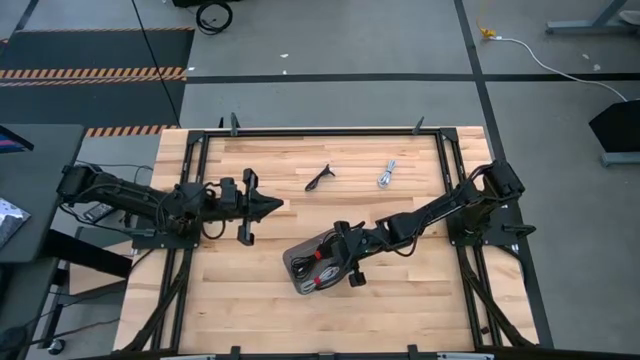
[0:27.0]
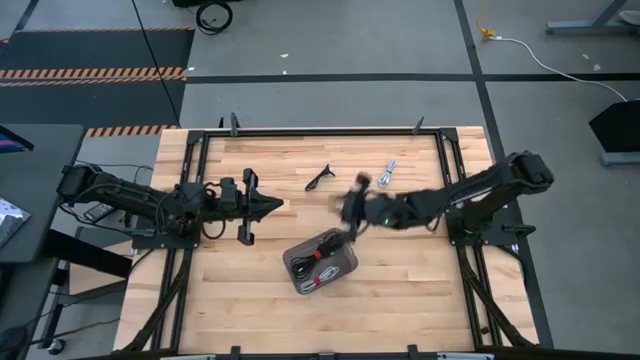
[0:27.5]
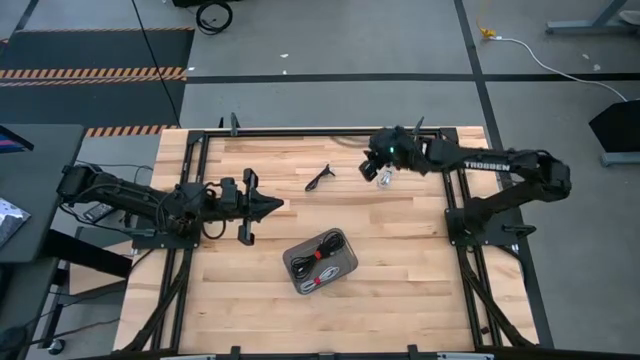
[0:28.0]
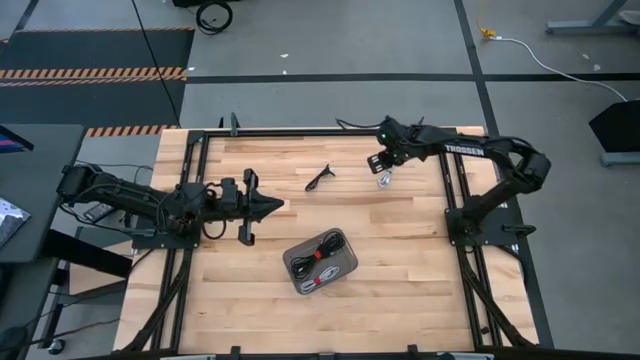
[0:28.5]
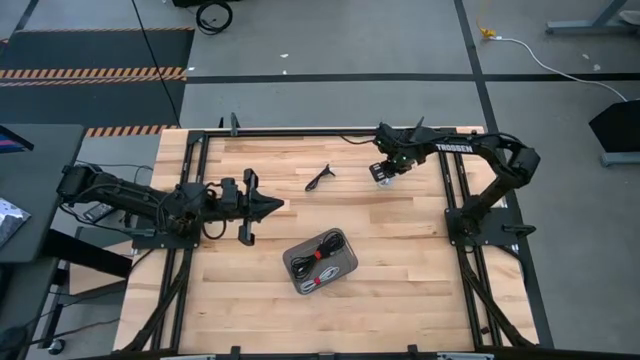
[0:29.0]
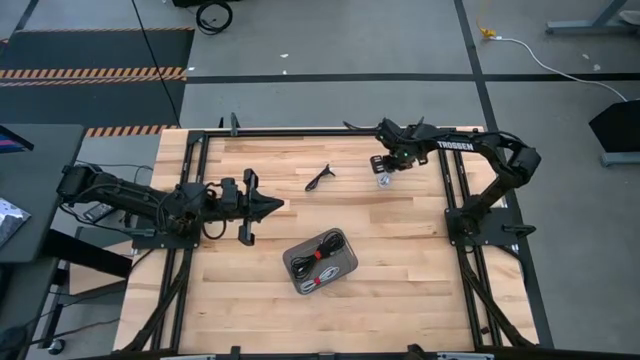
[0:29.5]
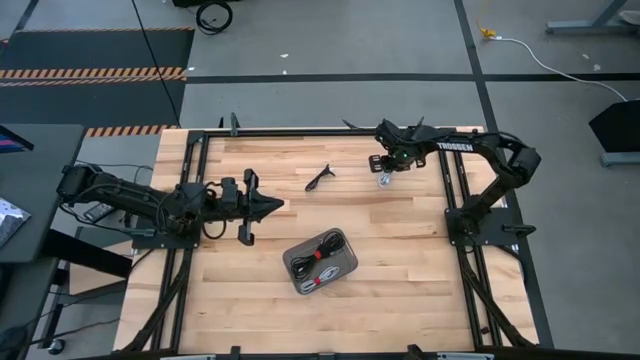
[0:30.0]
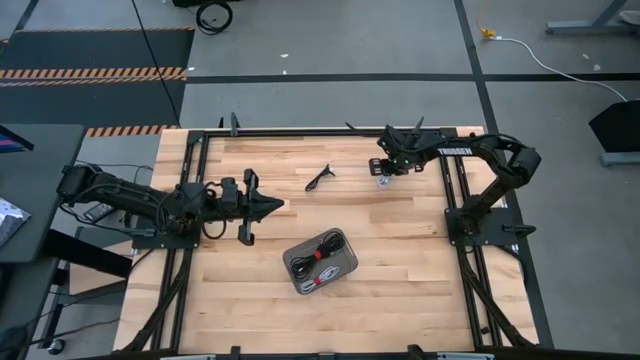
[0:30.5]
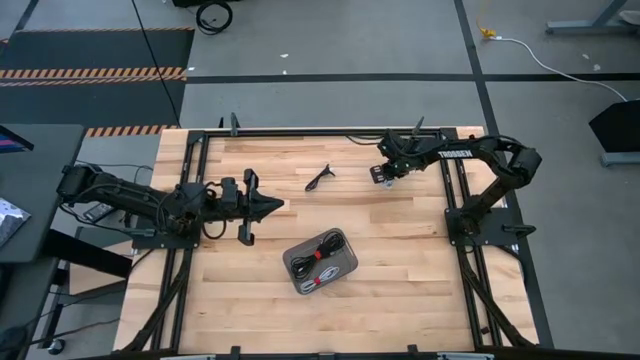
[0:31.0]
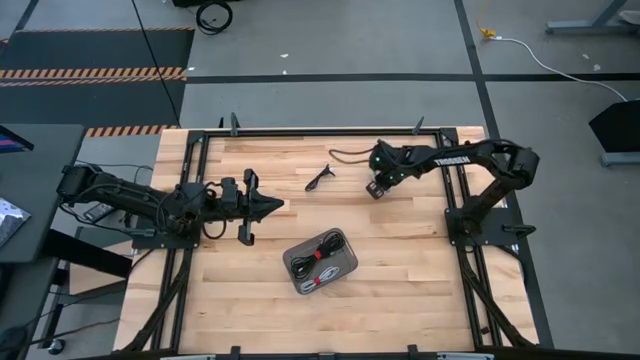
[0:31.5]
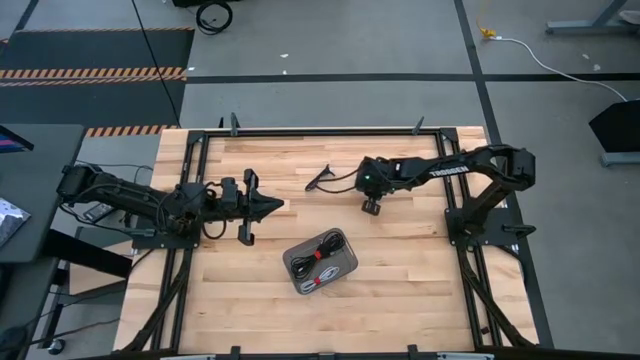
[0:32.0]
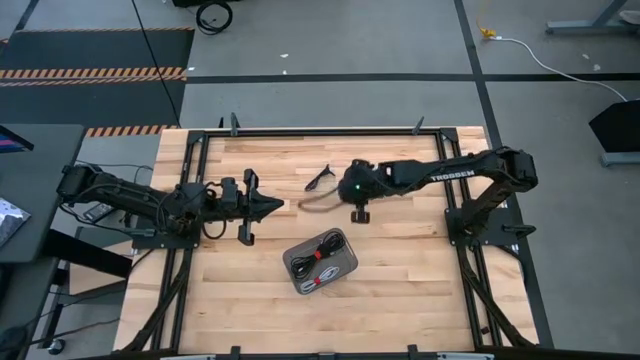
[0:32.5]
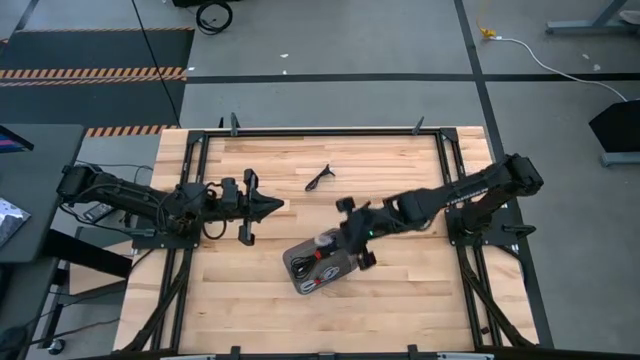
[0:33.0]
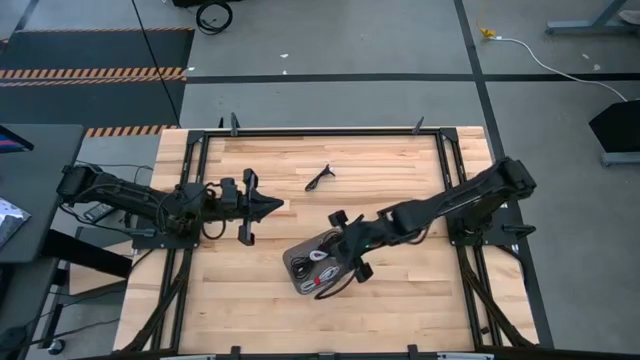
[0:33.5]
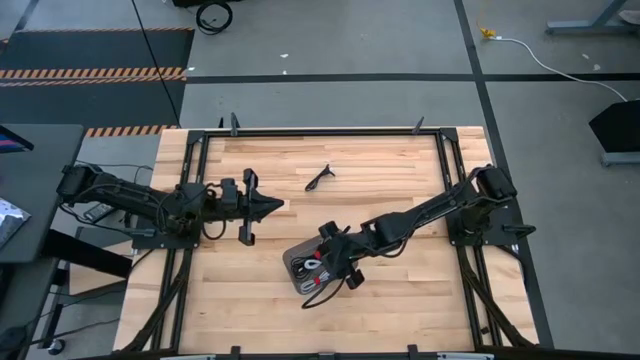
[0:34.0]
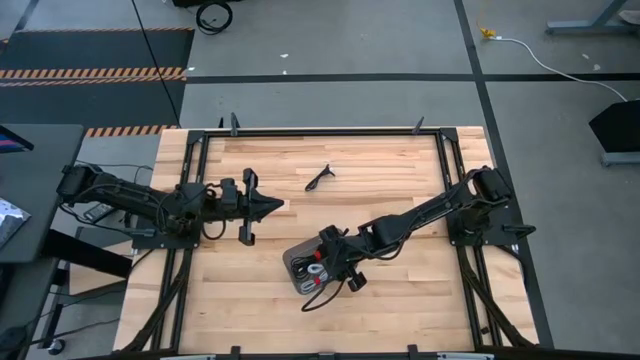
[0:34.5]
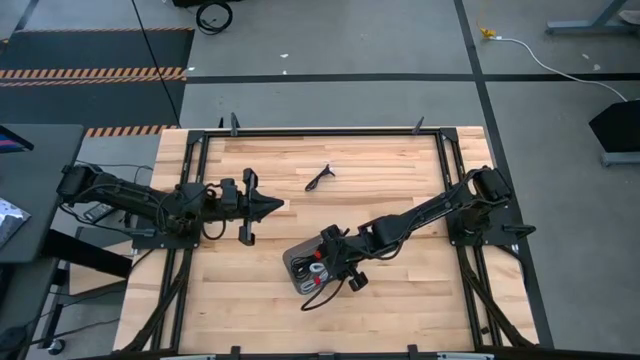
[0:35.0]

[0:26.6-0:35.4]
Task: Pick and place USB-C Cables
Put the white charger cable into the black bin

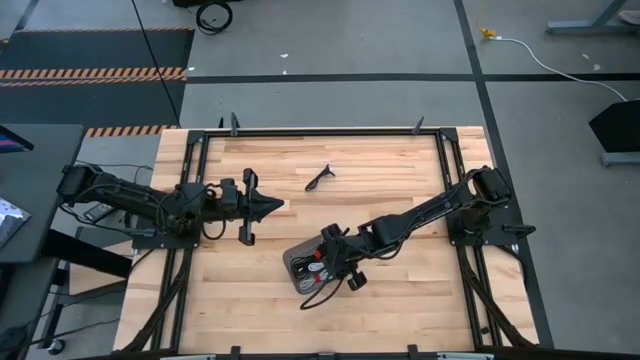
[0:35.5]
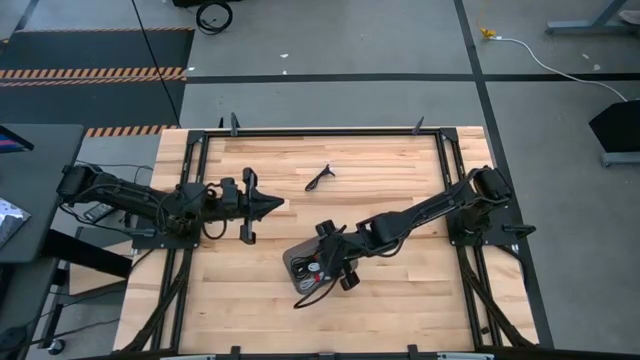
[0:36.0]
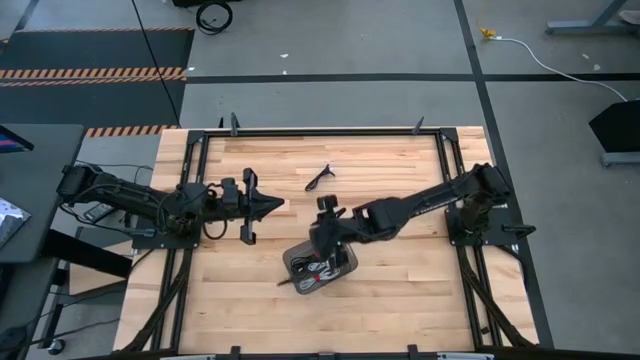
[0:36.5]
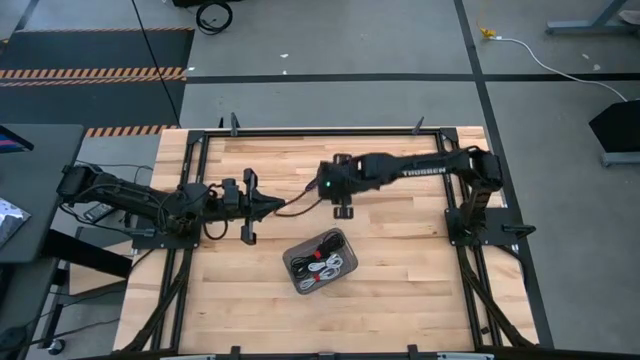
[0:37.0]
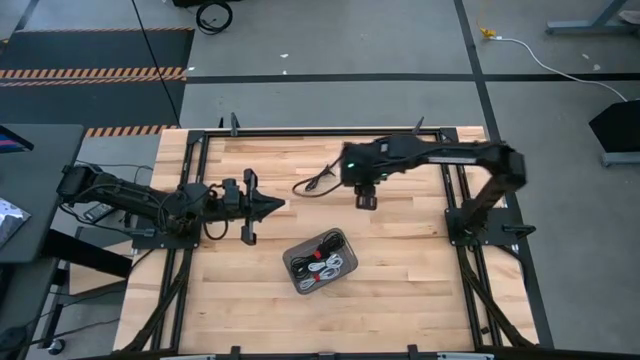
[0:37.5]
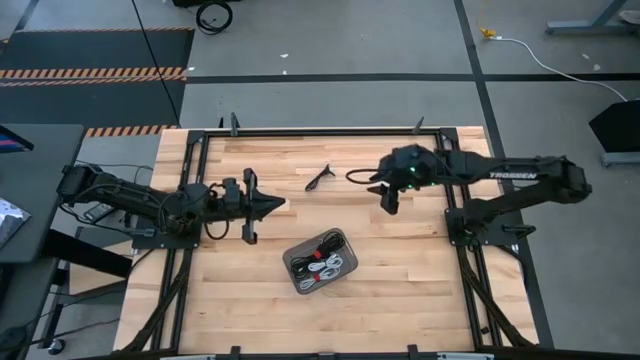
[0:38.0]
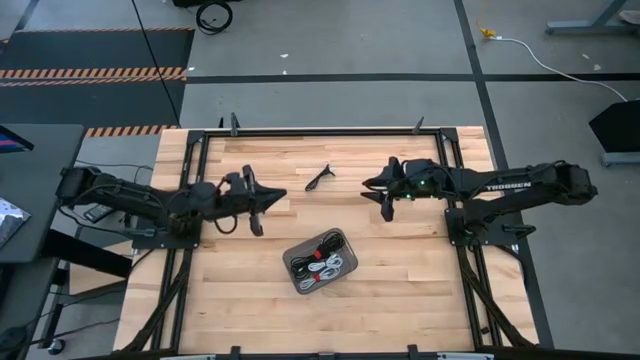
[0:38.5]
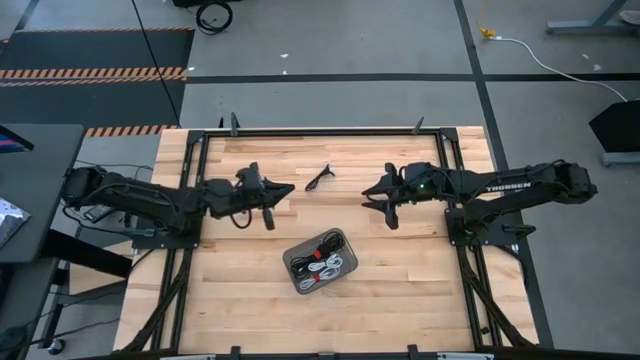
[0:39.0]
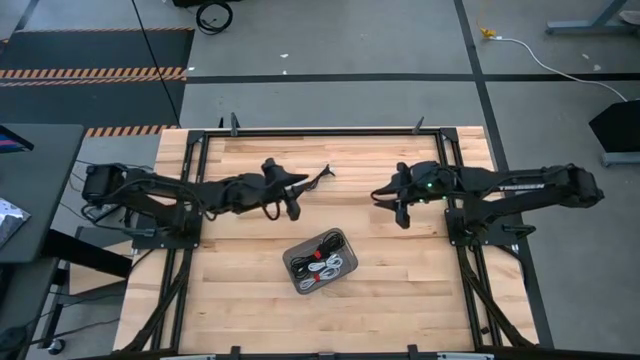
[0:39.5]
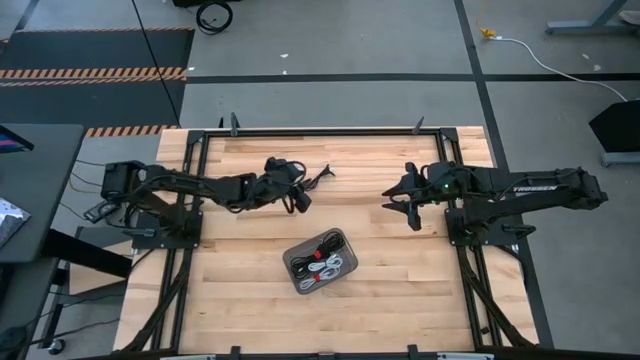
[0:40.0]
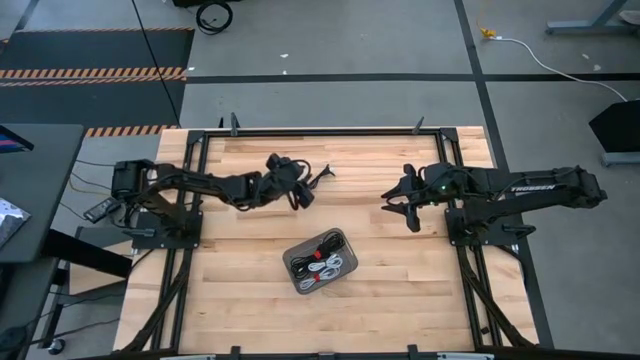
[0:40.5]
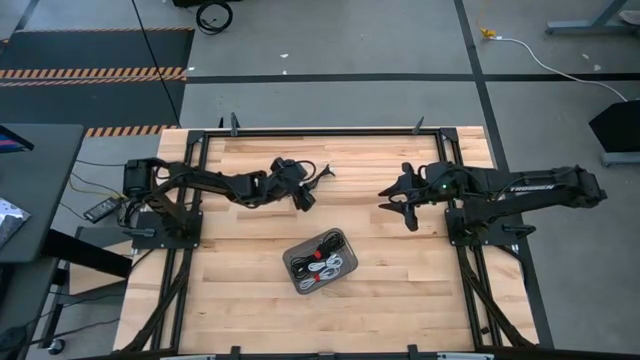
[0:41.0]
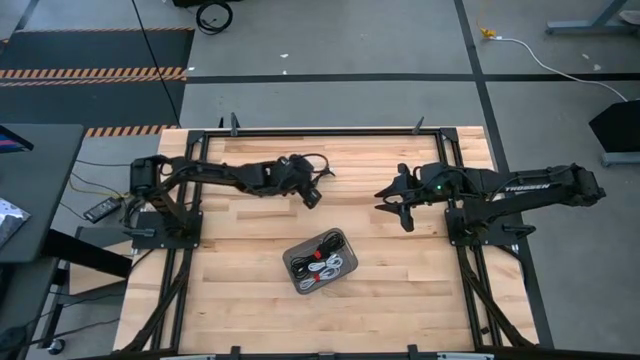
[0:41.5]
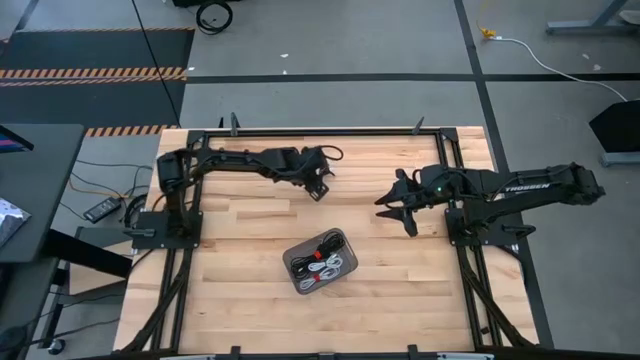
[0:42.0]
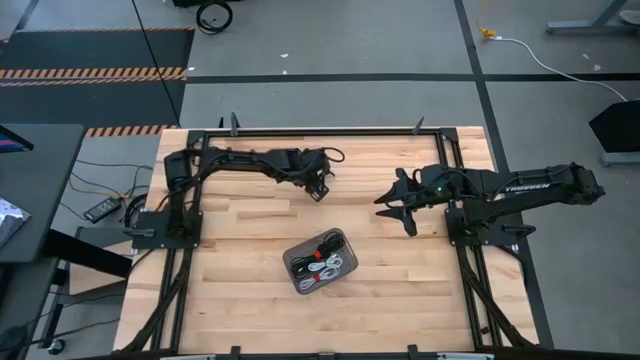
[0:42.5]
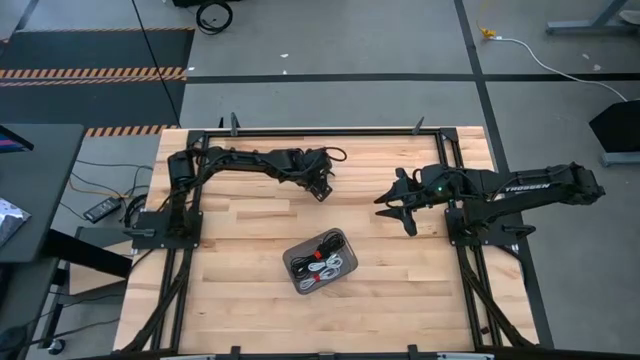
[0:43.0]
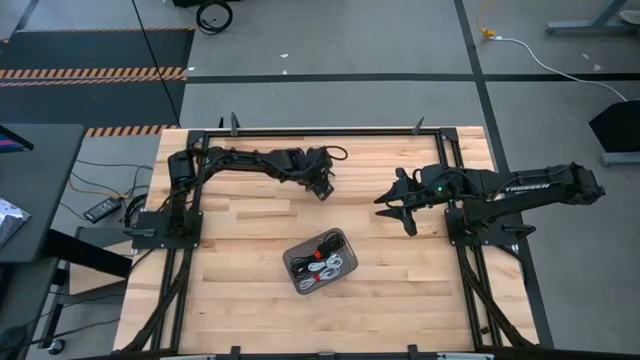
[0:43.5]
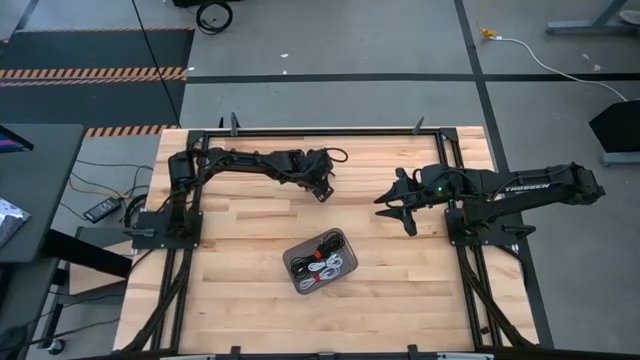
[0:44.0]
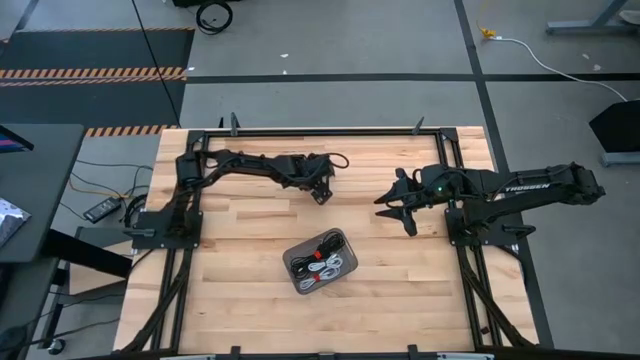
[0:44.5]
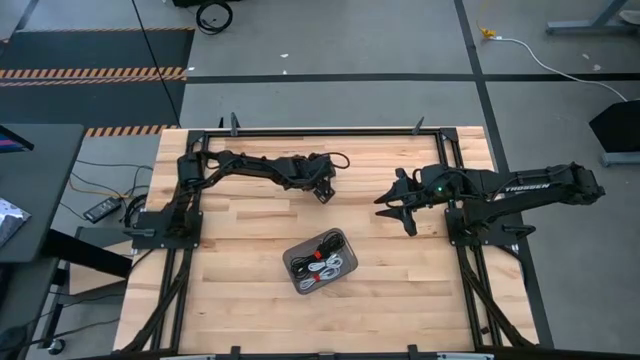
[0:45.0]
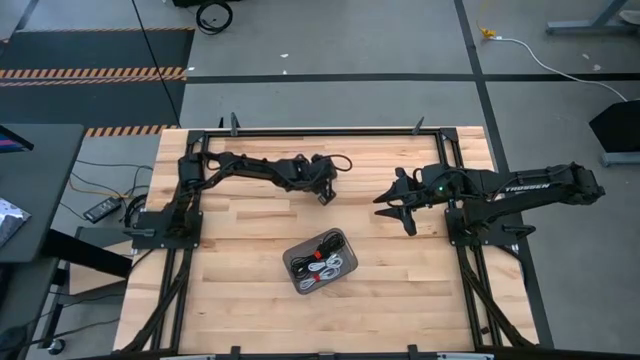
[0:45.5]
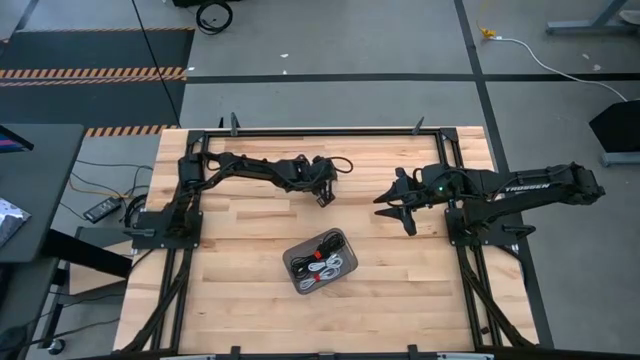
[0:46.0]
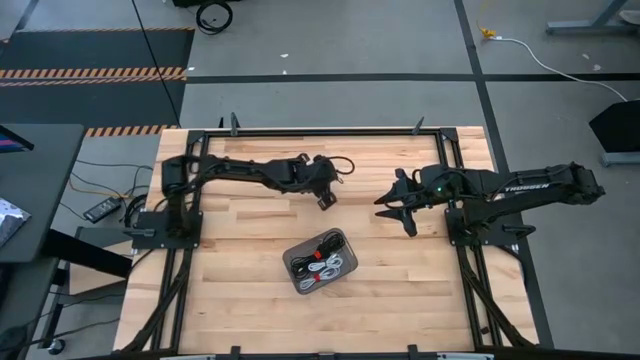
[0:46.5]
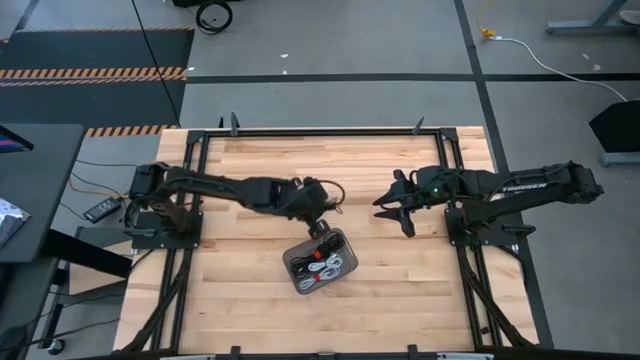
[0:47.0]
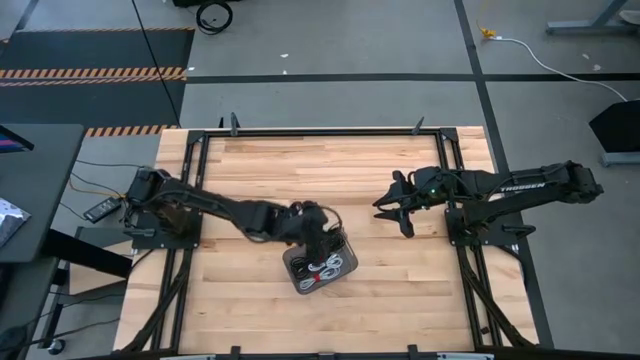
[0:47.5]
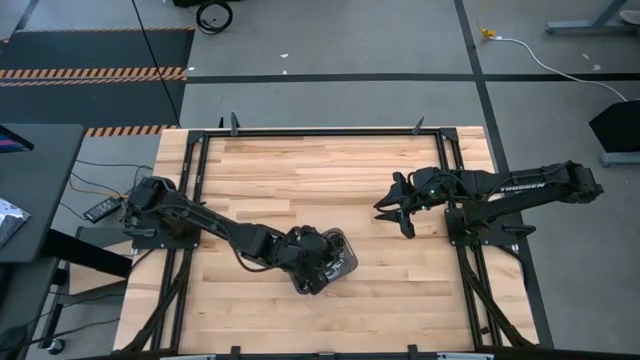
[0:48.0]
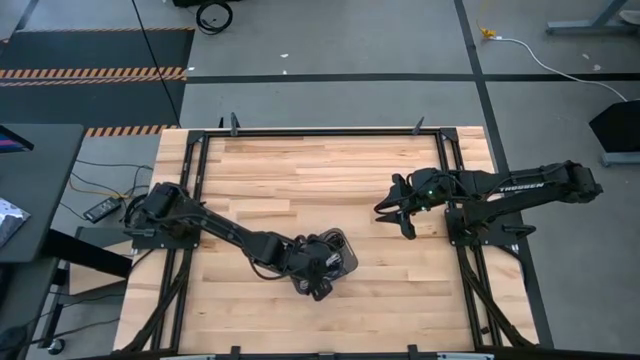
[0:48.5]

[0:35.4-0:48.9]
Put the black charger cable into the black bin
